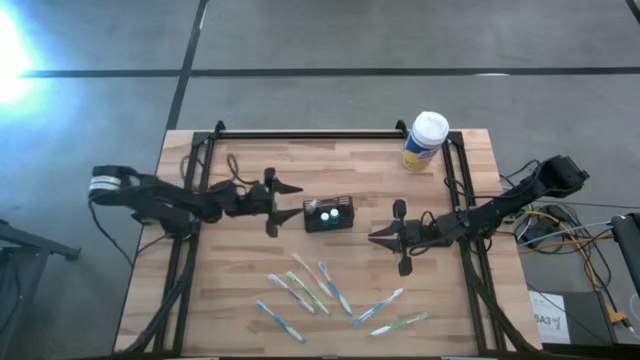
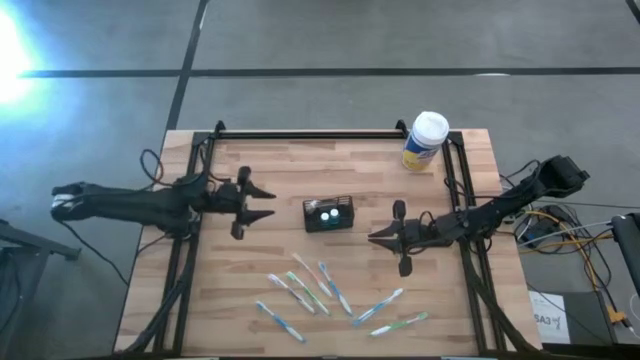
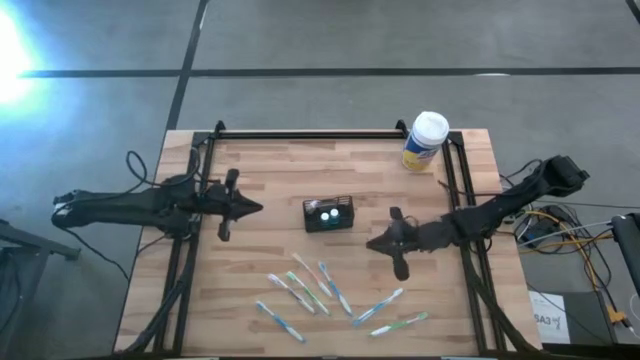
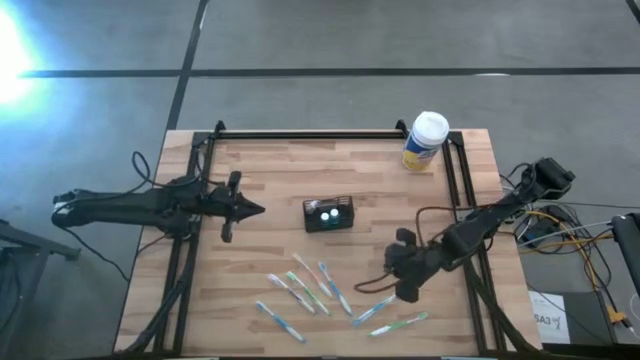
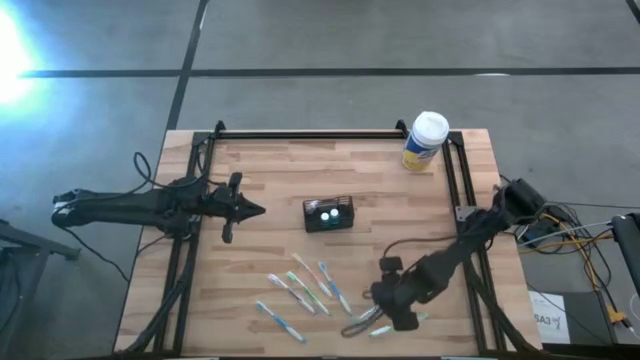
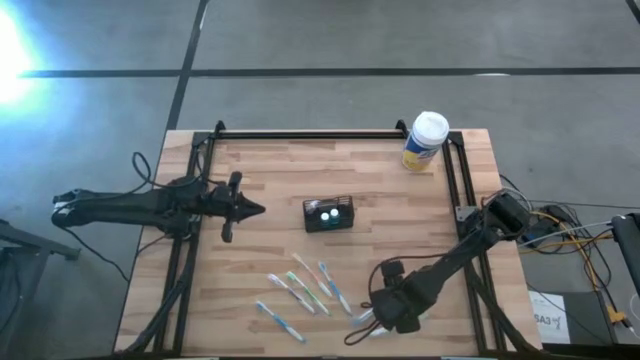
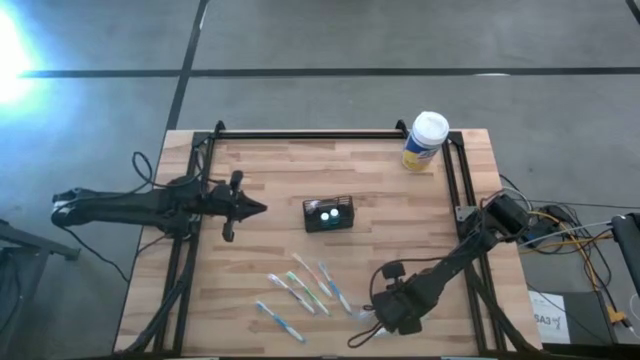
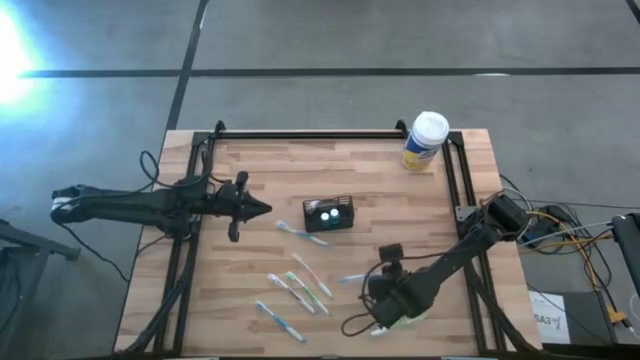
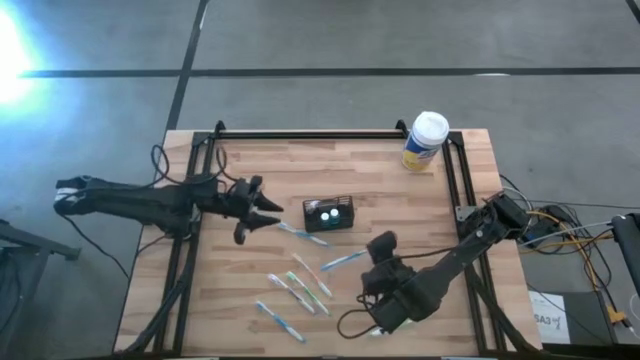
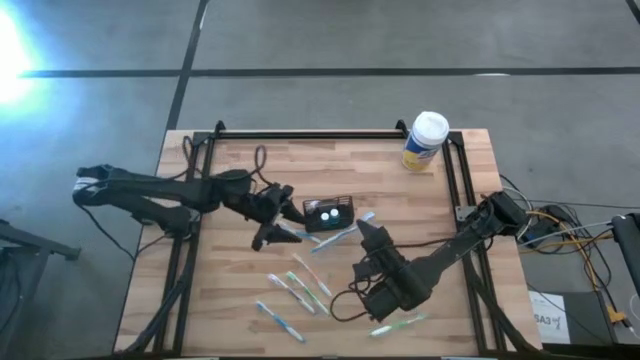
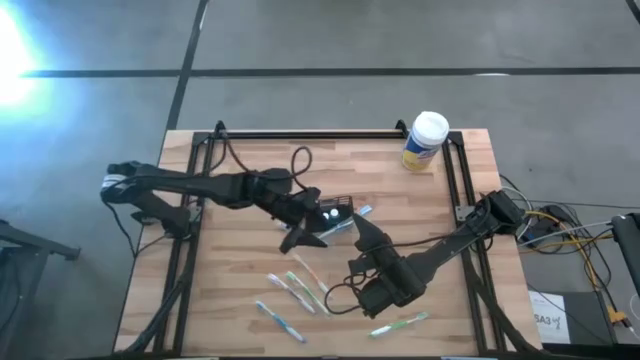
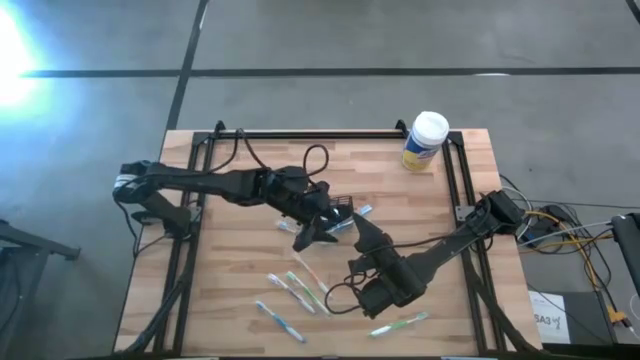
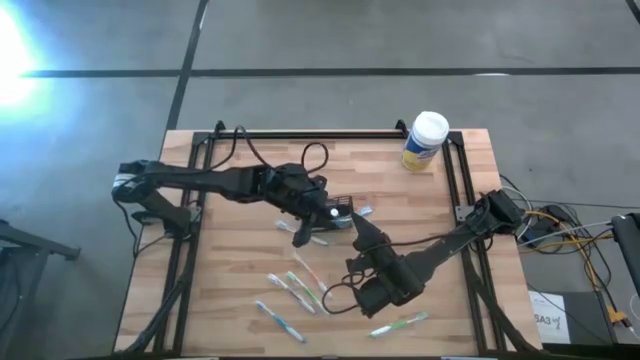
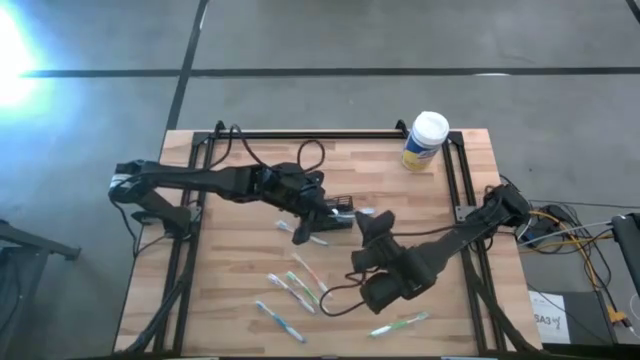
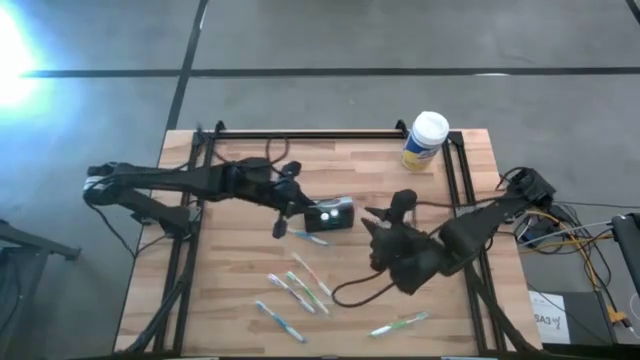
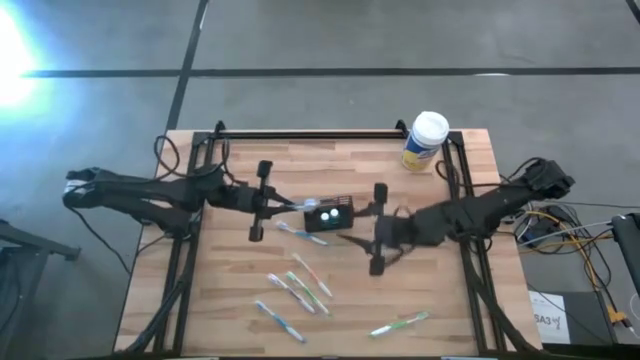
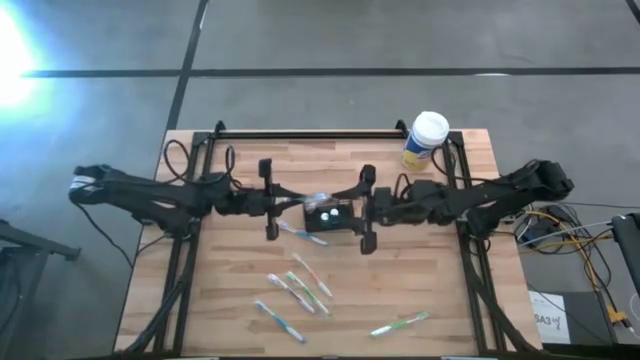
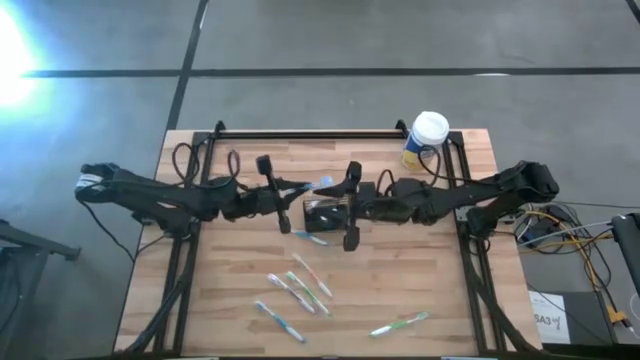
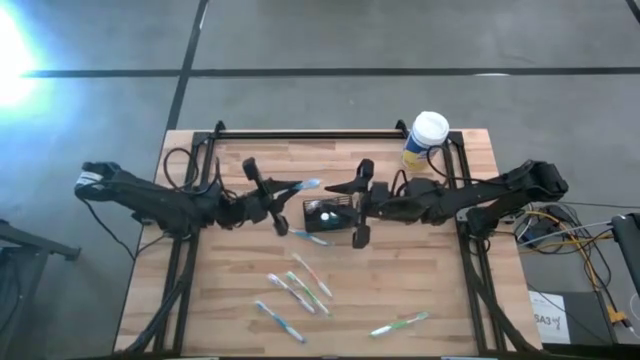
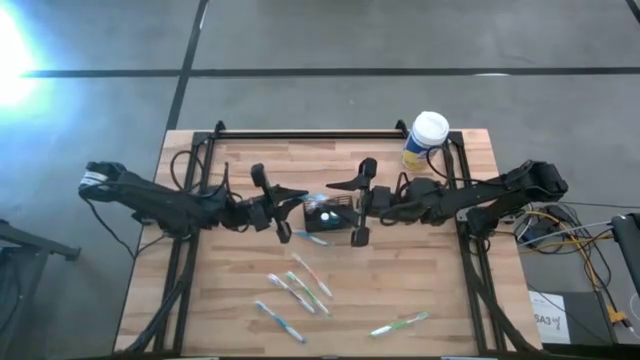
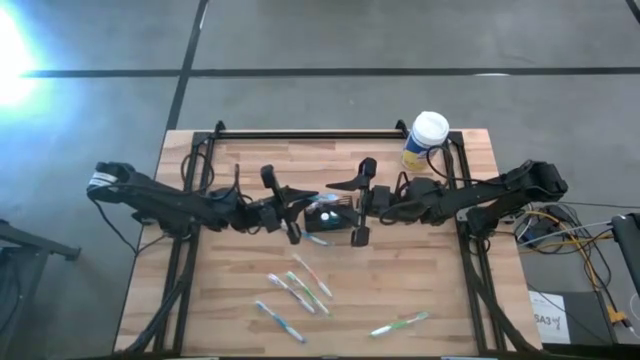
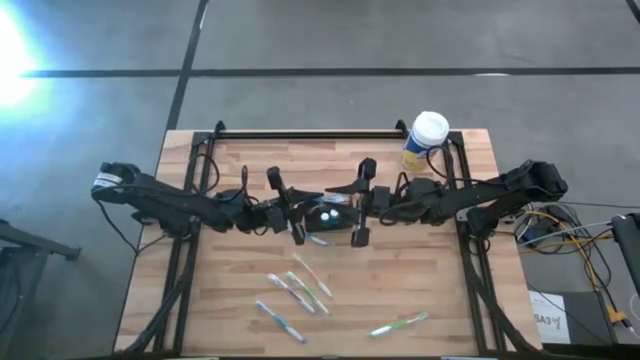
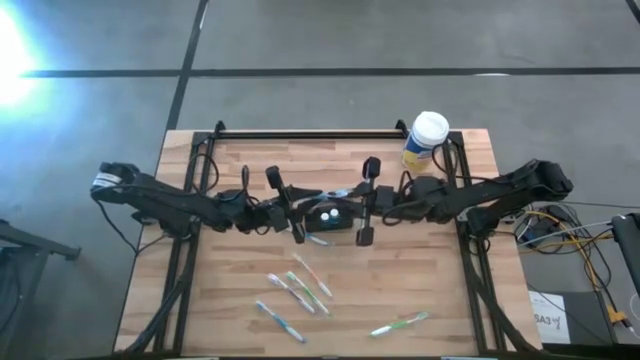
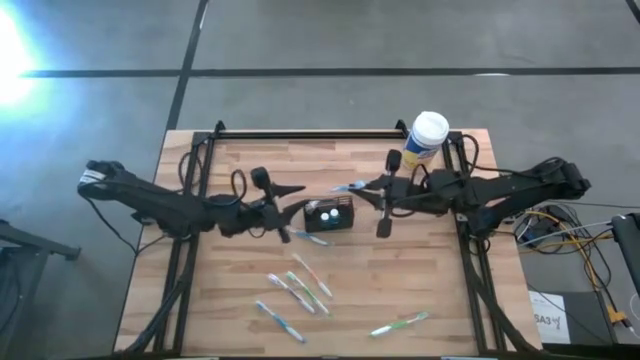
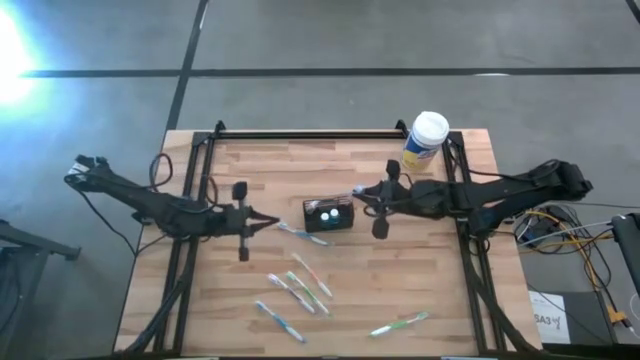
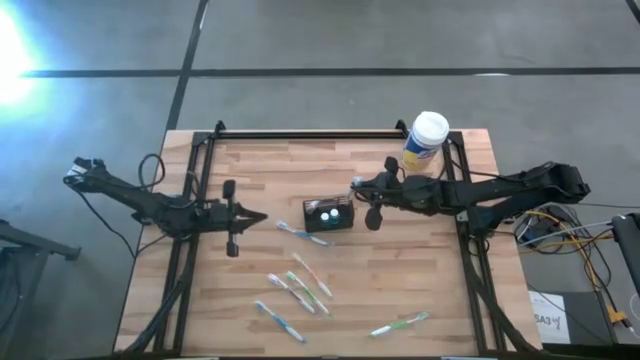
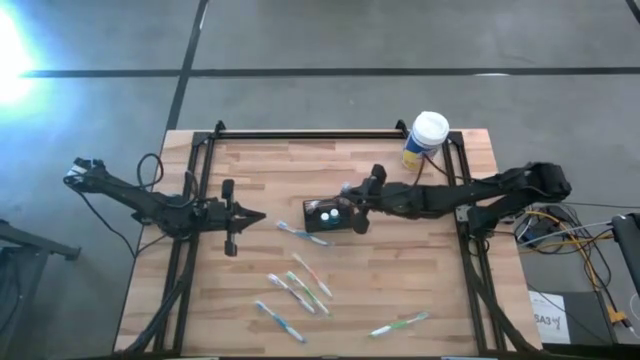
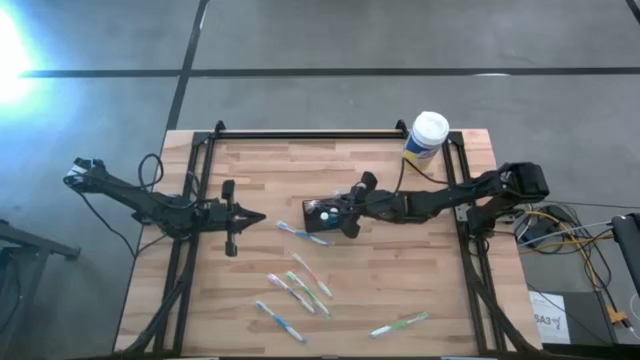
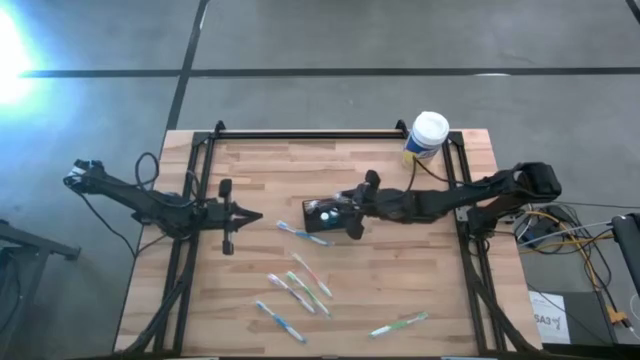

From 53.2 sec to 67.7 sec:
Task: Pick & Place toothbrushing station
Put the right blue toothbrush into the black wire organizer

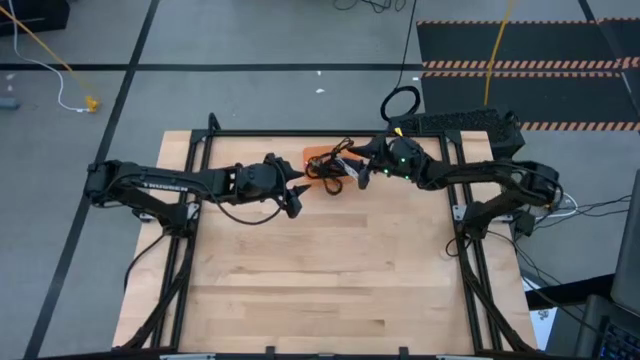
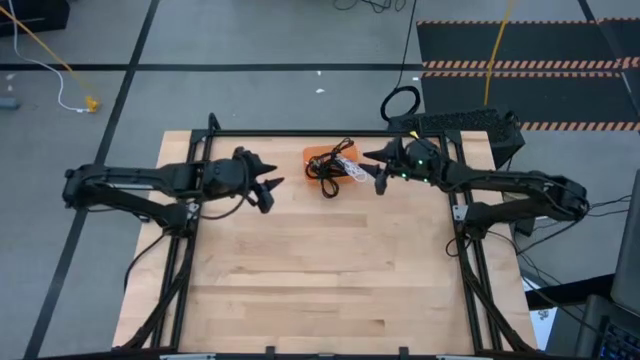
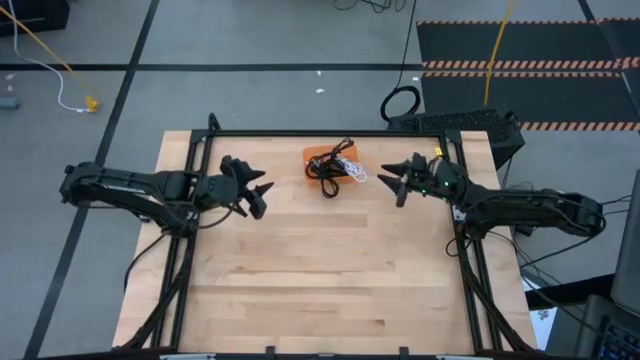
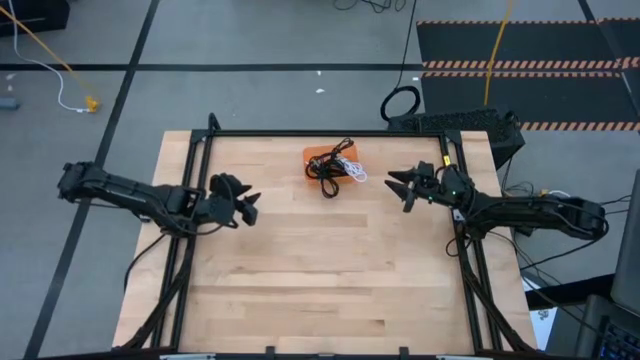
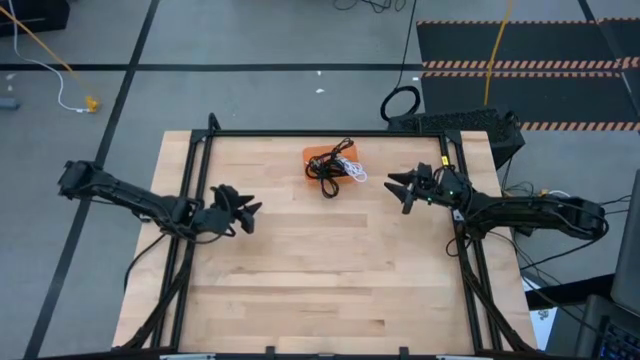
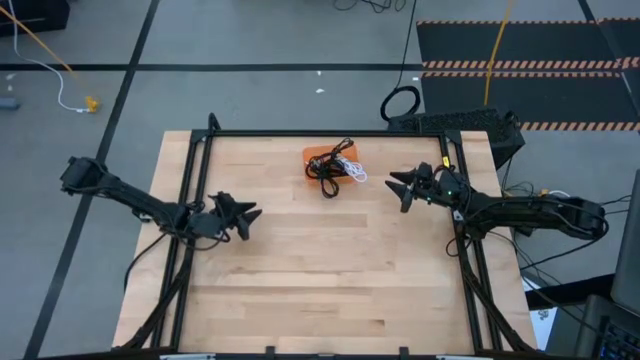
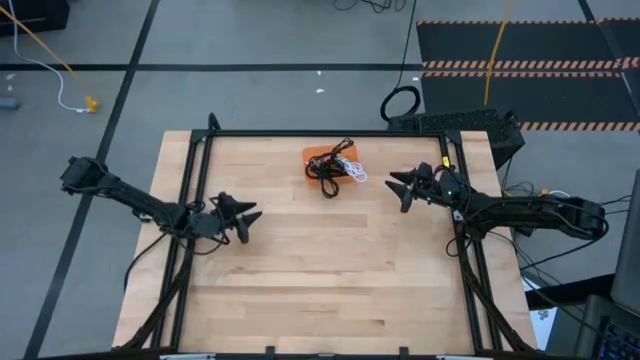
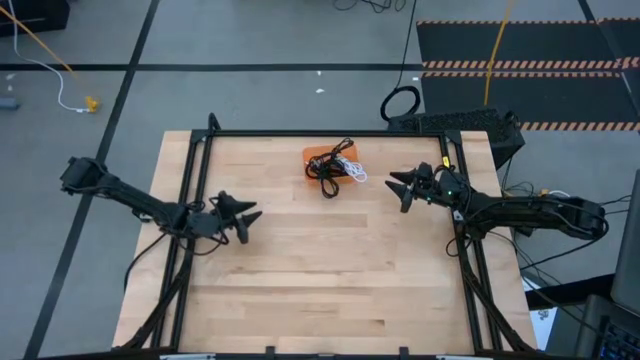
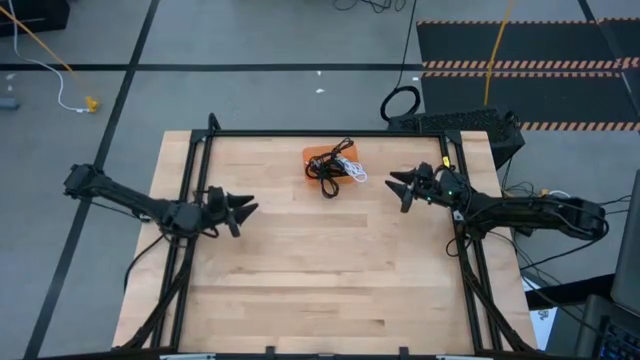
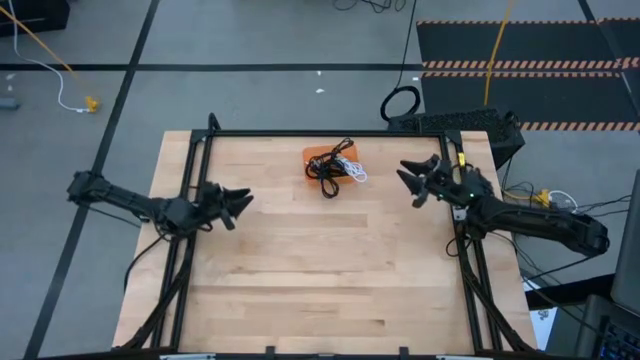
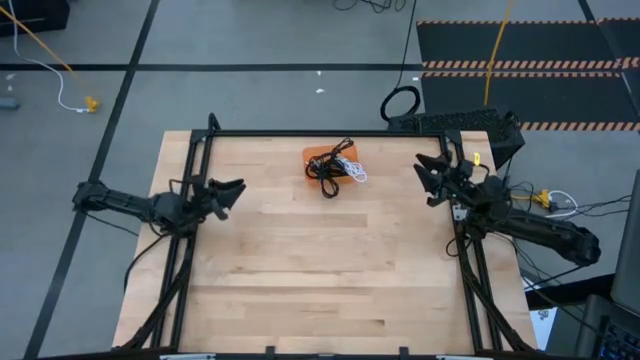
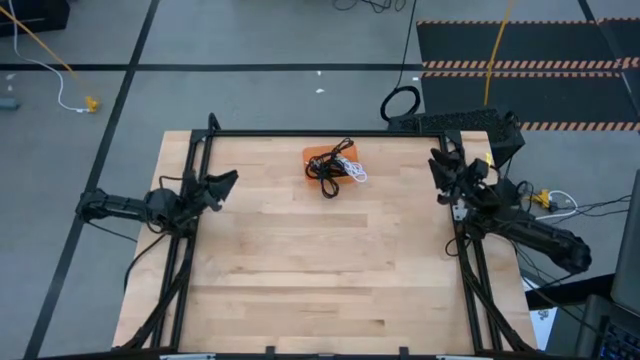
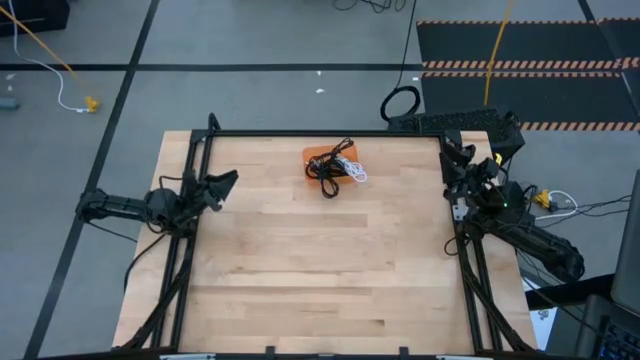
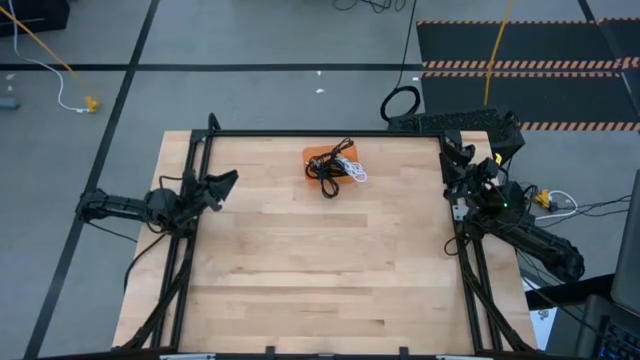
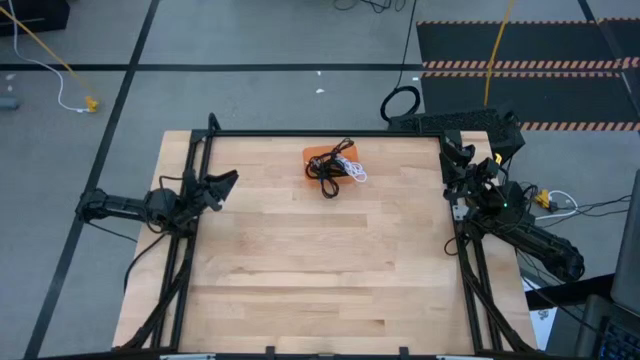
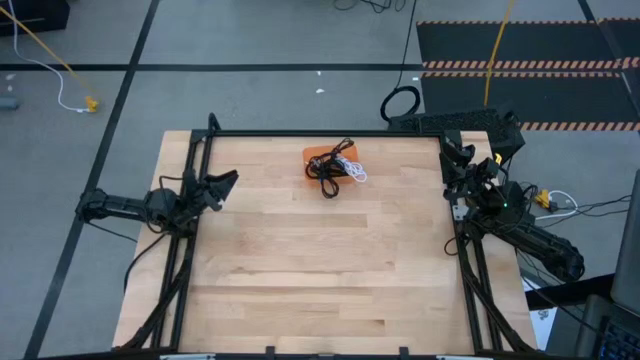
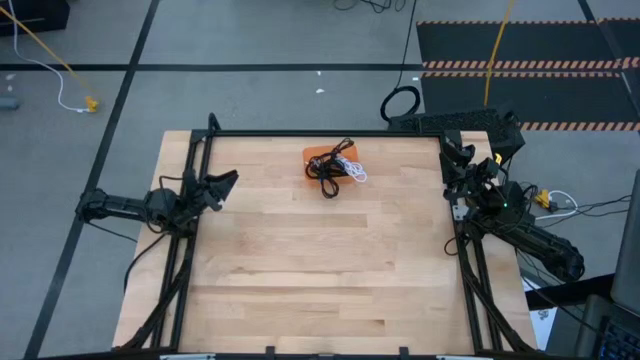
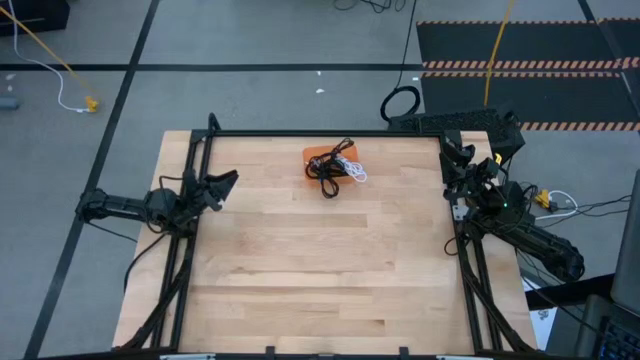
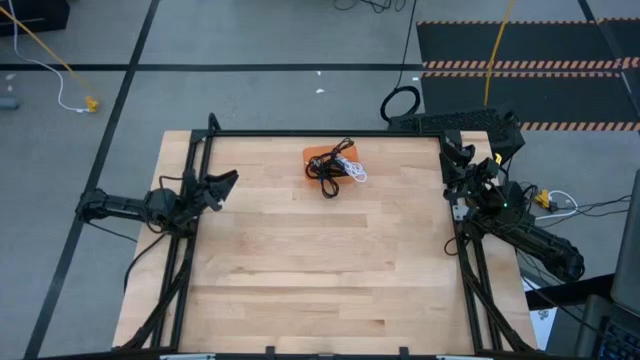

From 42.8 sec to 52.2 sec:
Task: Pick and place USB-C Cables
Return to Home Position
